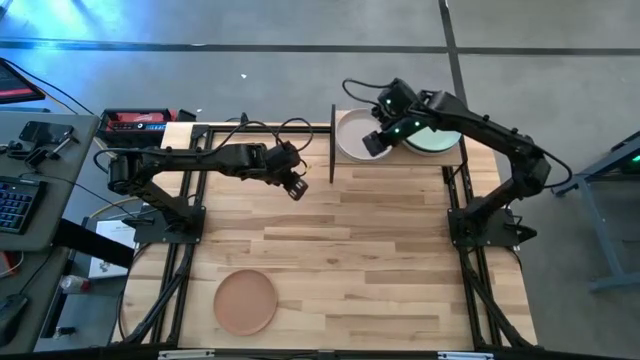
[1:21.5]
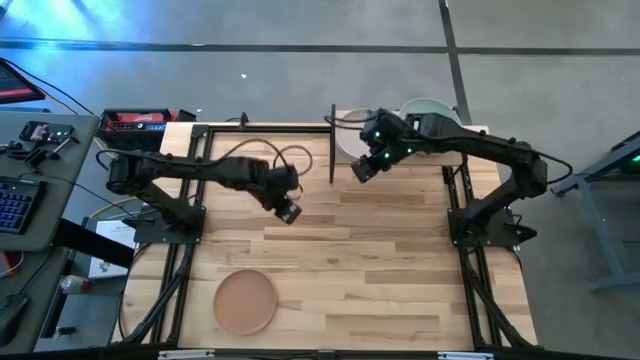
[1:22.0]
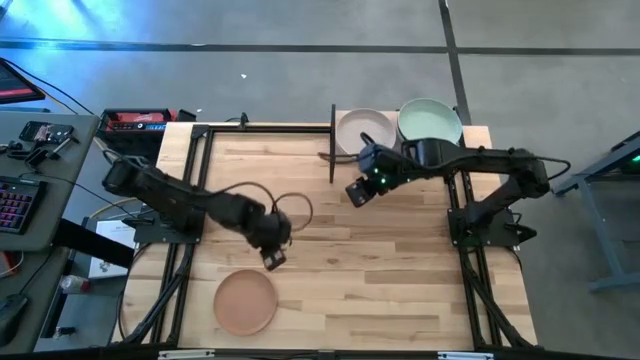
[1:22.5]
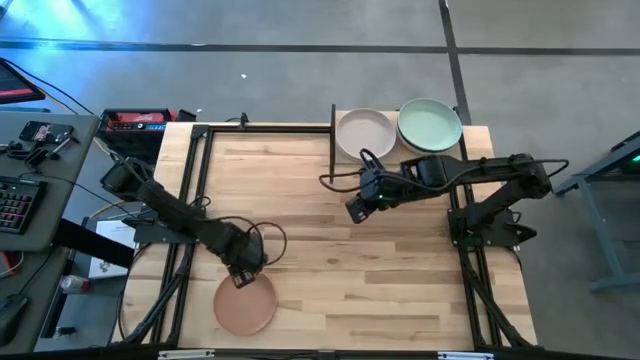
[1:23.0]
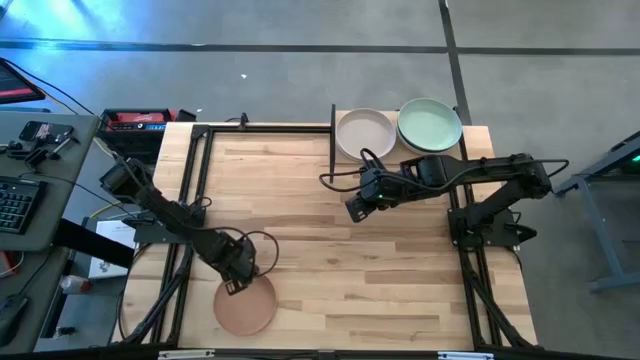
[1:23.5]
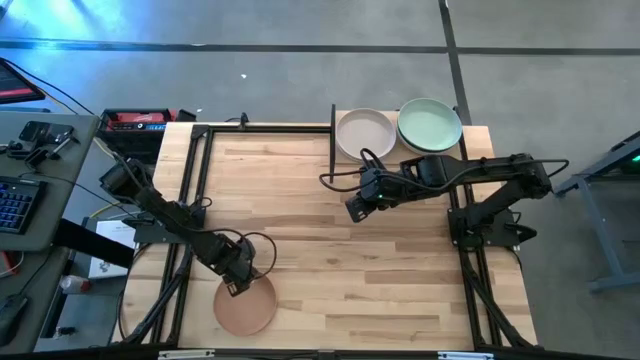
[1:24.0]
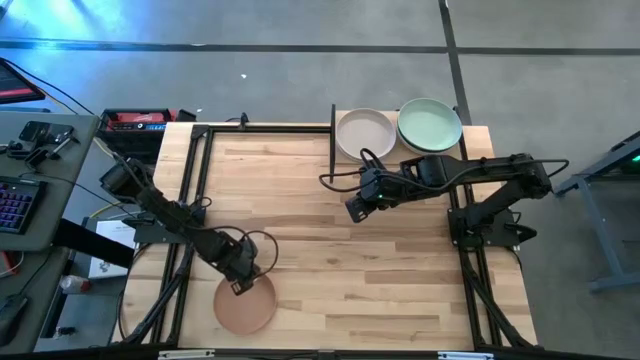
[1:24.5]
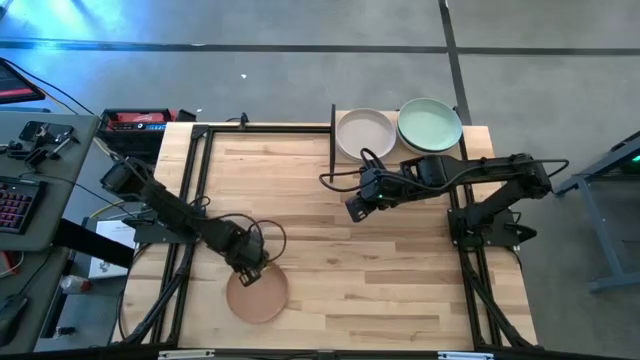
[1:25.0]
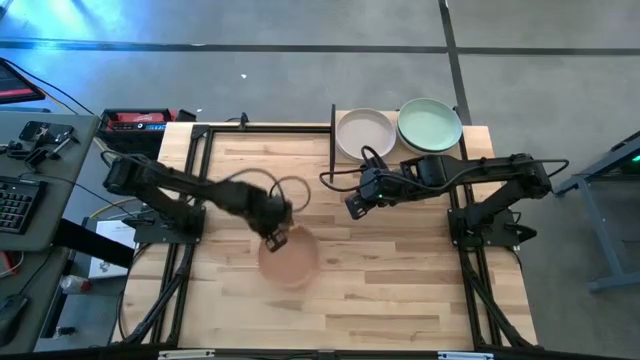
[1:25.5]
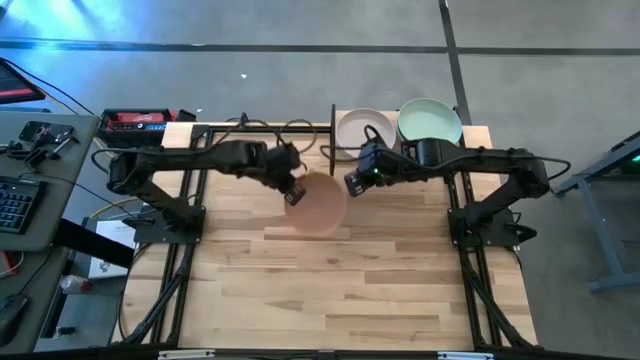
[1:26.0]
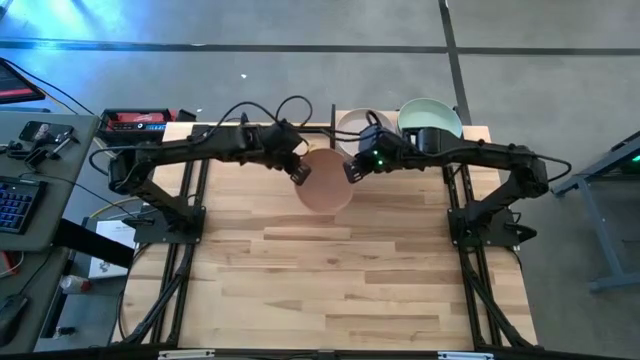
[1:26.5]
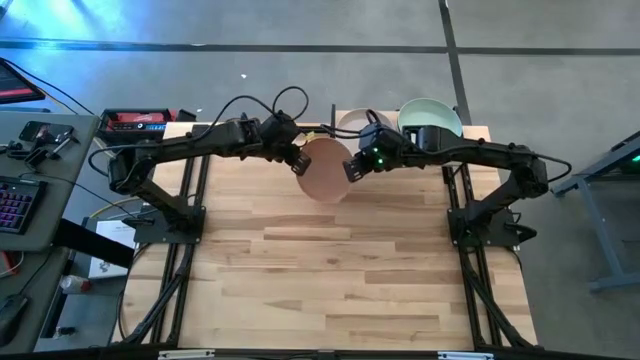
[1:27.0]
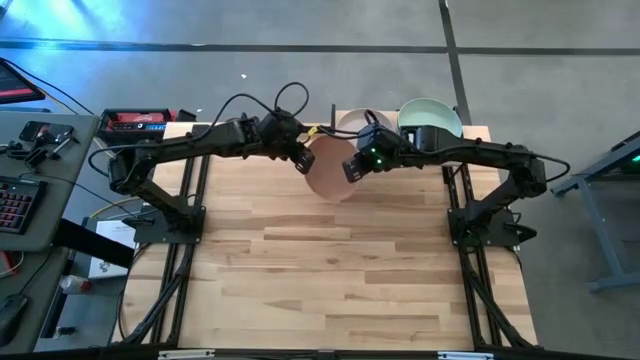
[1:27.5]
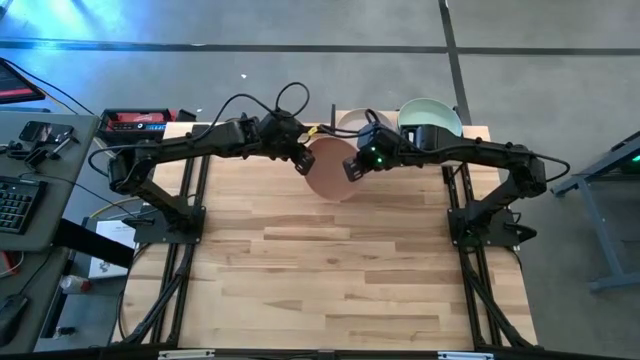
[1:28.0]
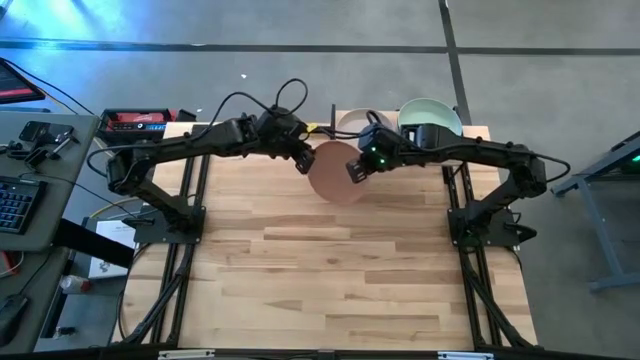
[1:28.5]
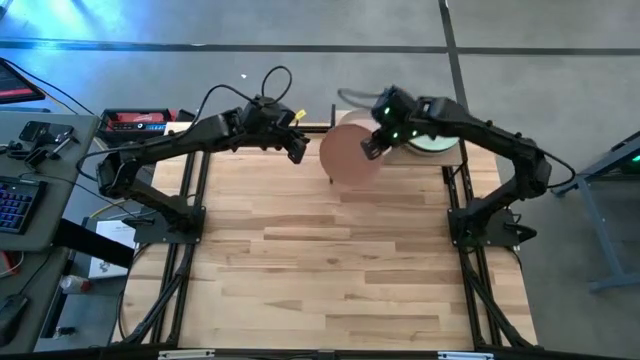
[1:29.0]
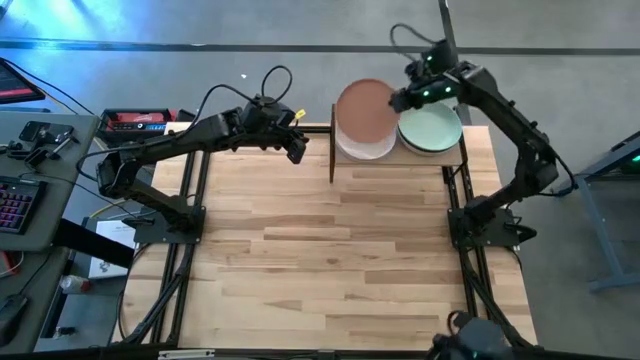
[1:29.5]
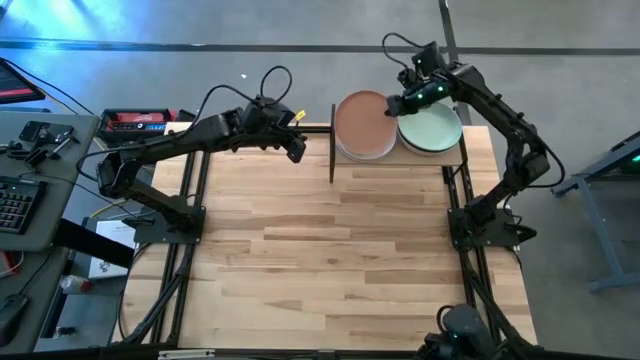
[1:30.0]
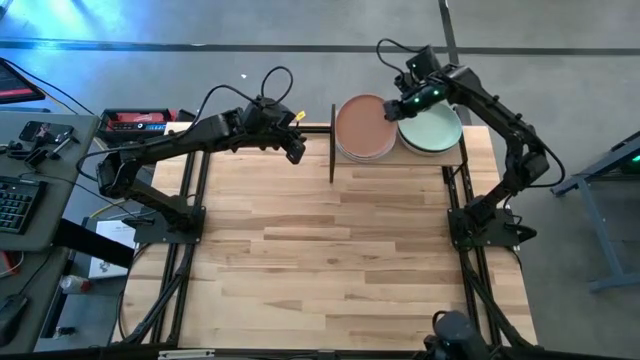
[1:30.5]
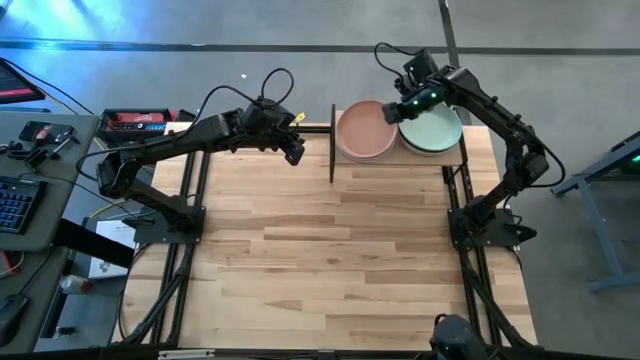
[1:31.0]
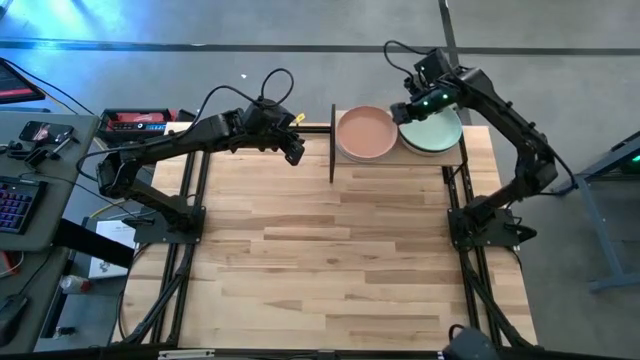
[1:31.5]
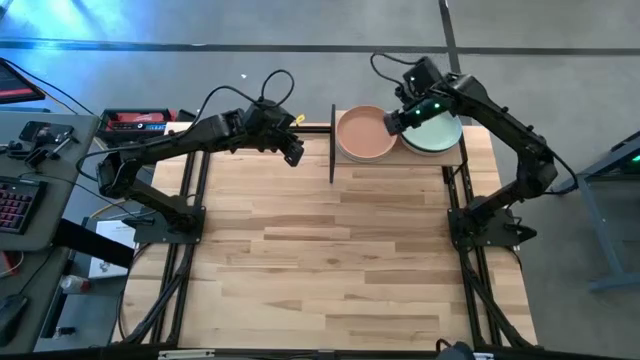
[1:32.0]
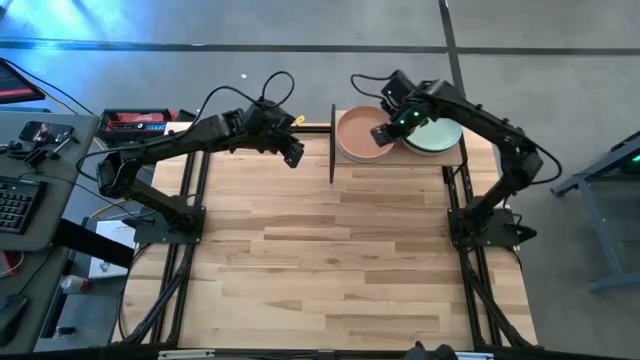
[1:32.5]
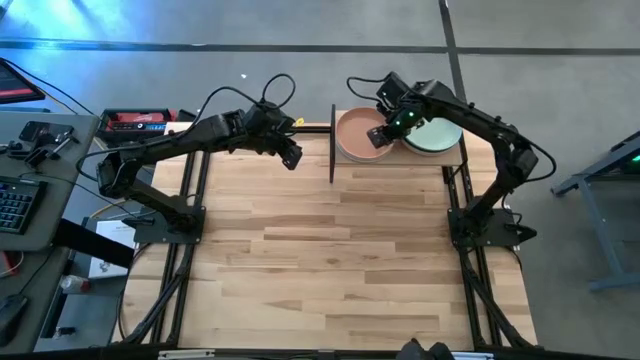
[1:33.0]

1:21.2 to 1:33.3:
Task: Place and stack plates onto a shelf
Stack the brown plate on top of the light brown plate on the shelf

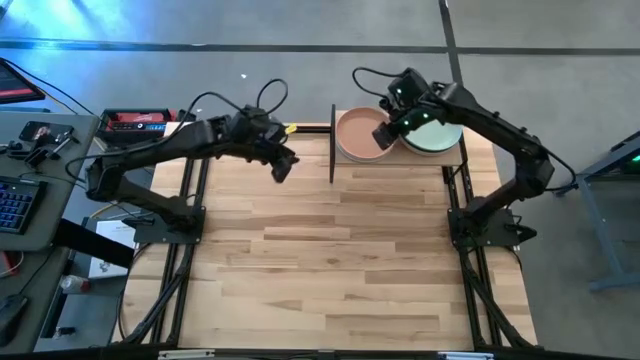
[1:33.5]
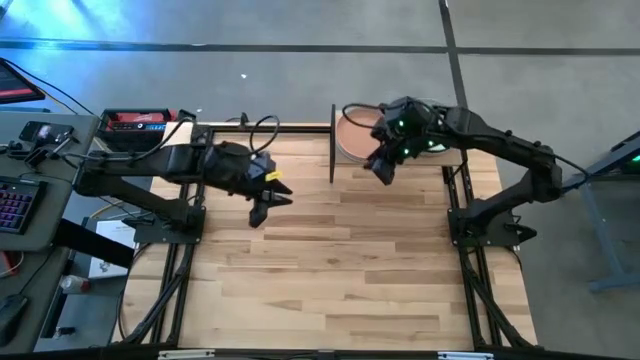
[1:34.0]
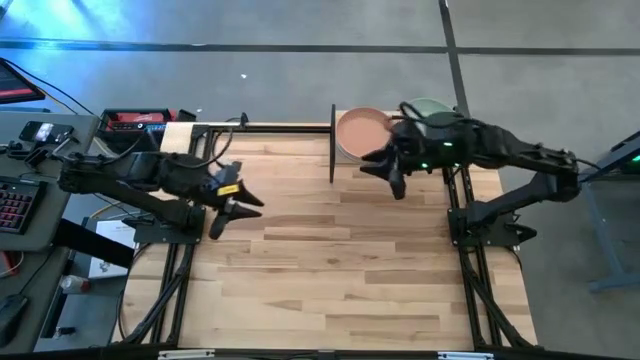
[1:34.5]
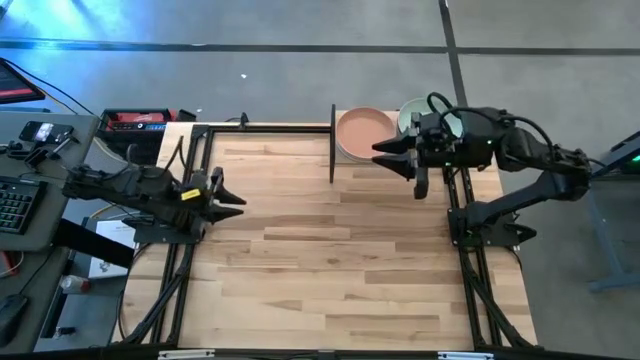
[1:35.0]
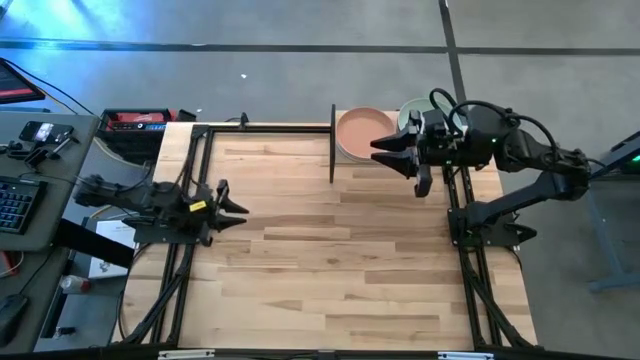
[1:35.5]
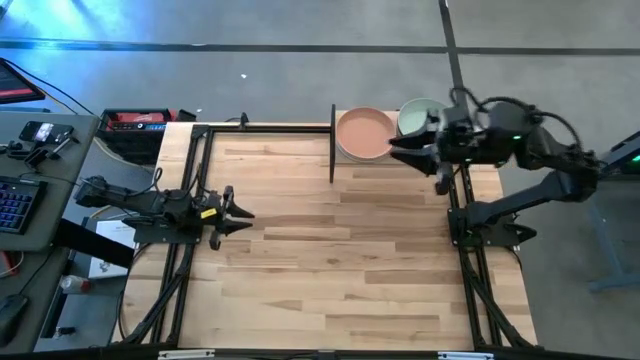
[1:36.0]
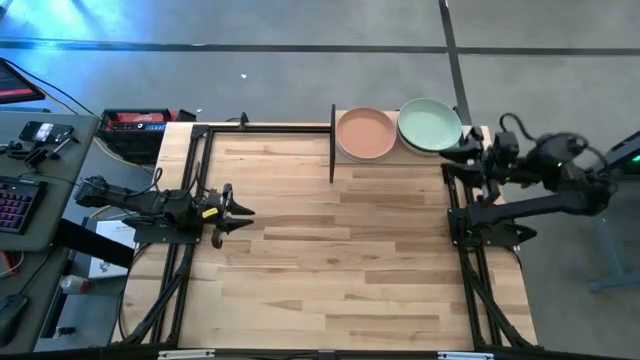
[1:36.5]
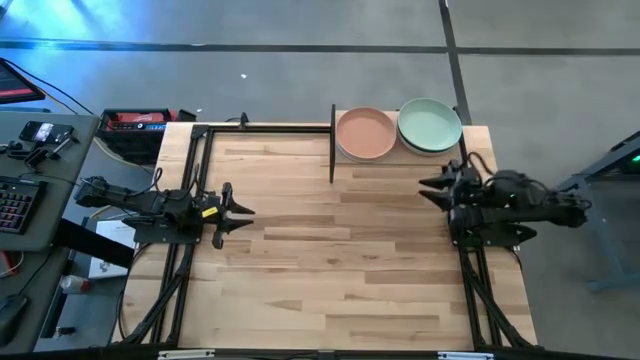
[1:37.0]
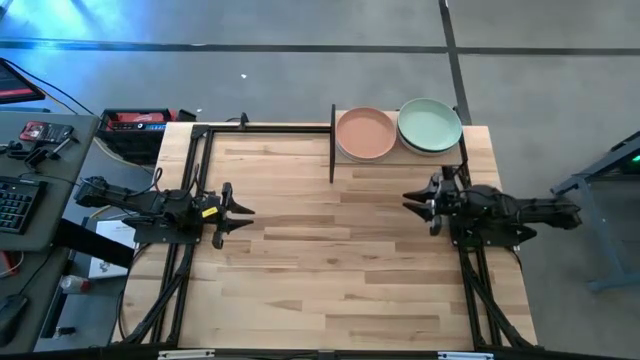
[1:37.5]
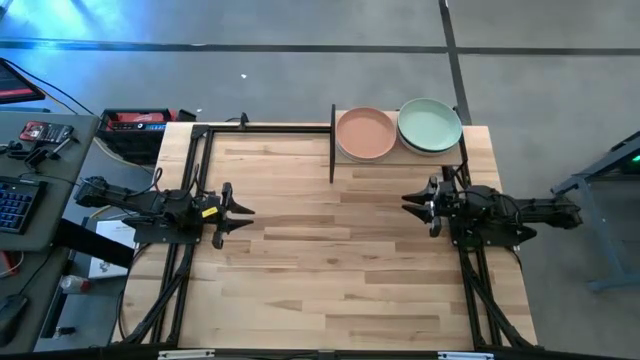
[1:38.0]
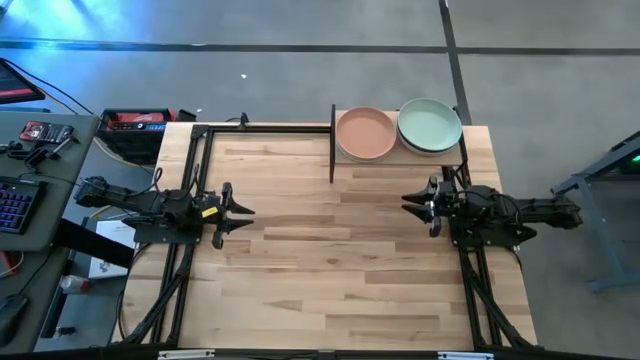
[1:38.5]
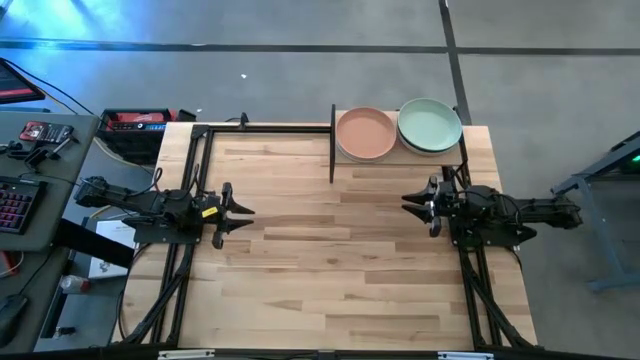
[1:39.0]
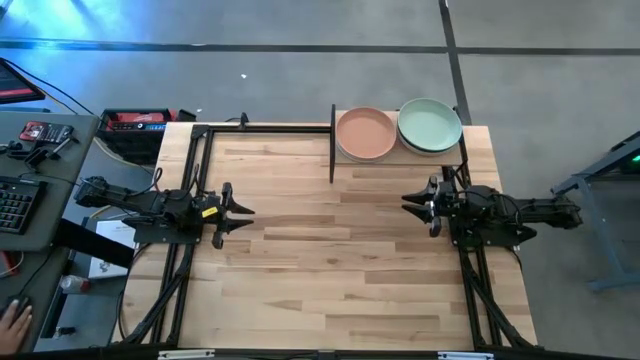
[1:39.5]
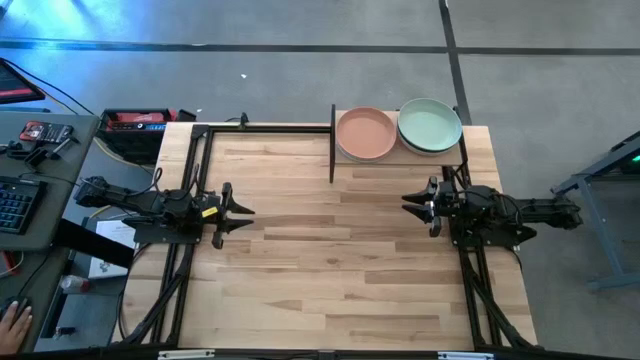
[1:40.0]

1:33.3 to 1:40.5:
Return to Home Position

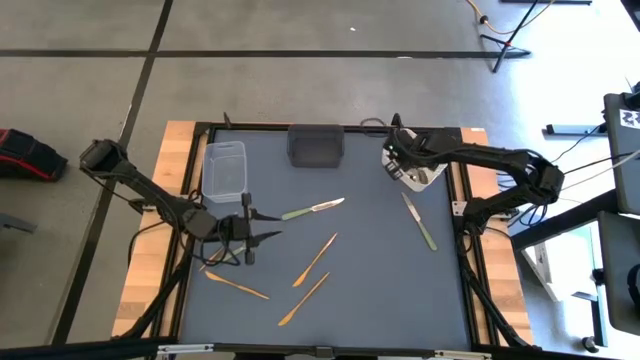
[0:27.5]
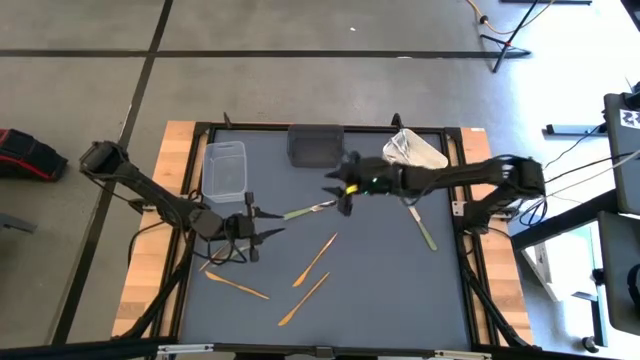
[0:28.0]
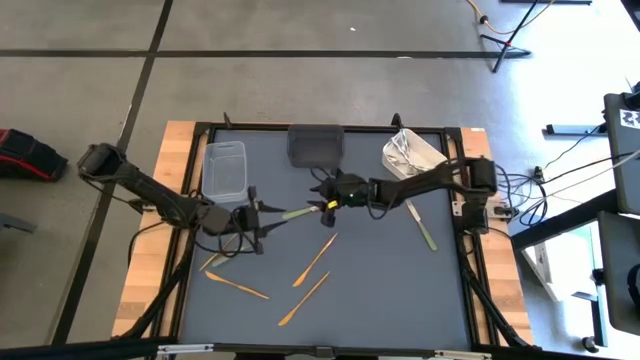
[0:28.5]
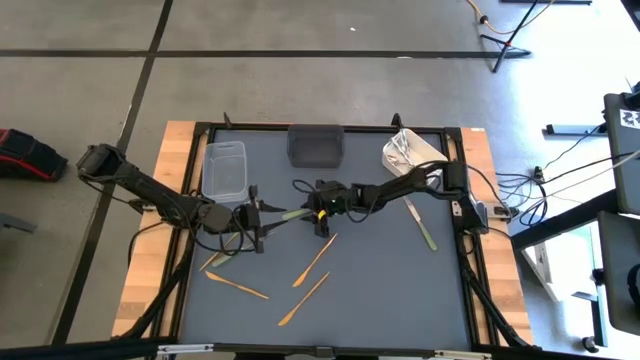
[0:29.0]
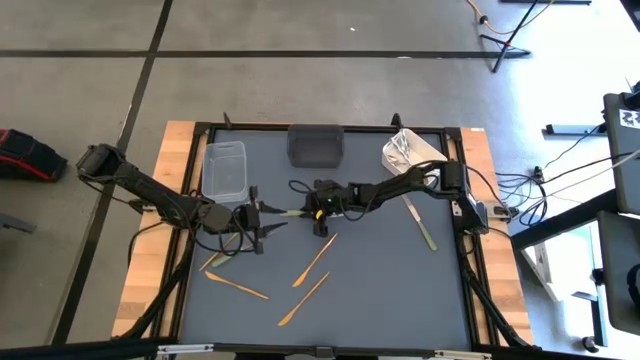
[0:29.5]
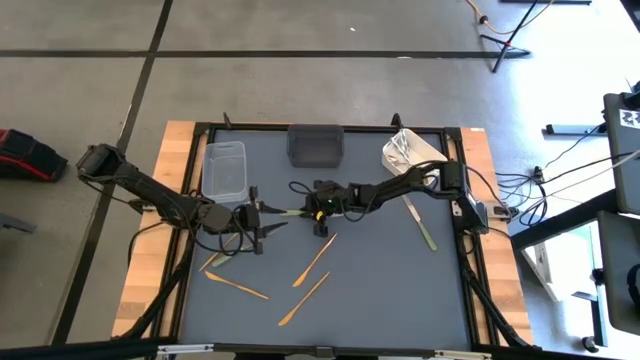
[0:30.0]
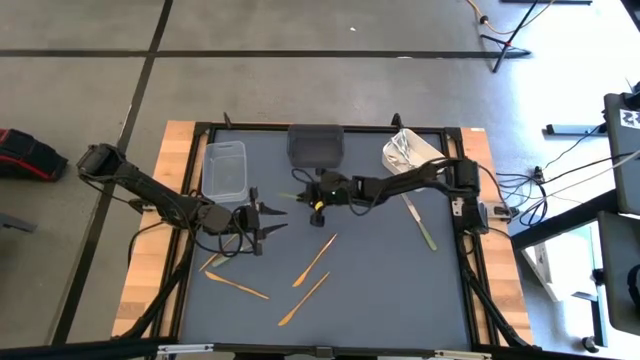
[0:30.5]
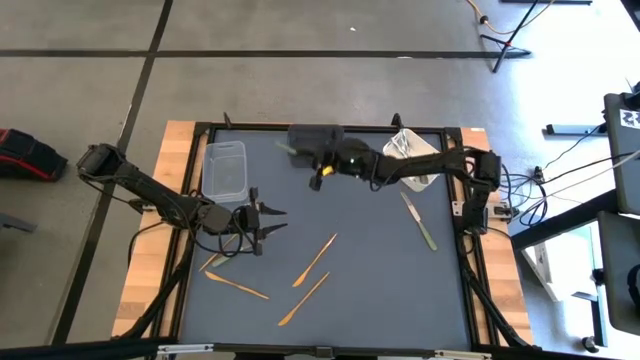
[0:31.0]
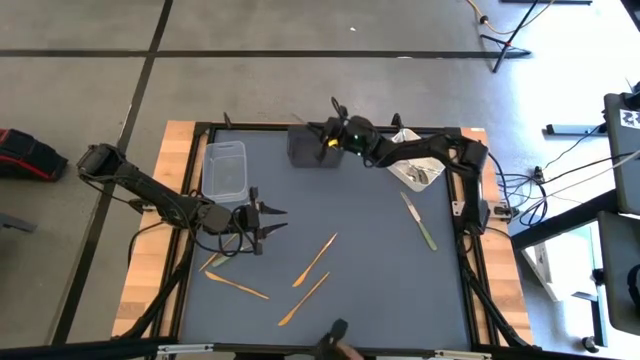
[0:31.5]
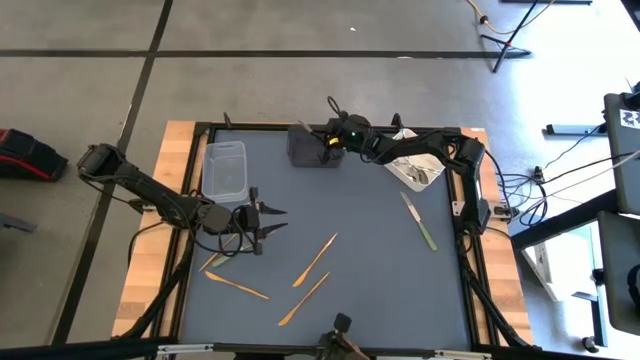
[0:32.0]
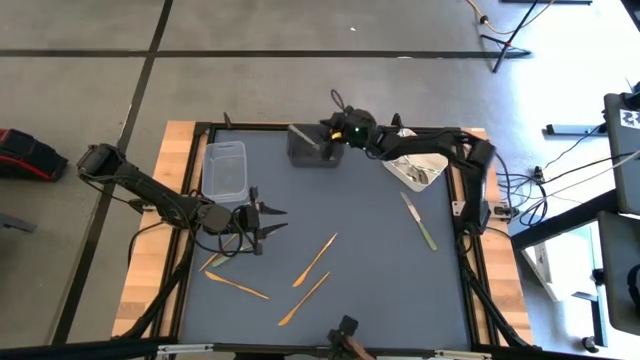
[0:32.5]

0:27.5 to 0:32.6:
Task: Sort silverware by color (type)
Put the center green knife into the gray transparent bin
